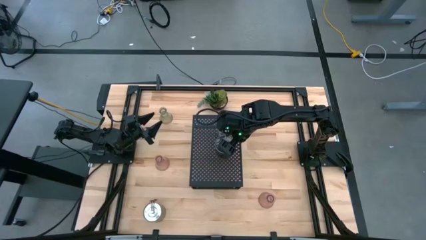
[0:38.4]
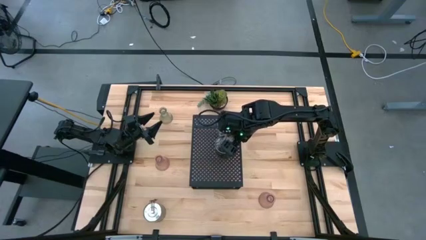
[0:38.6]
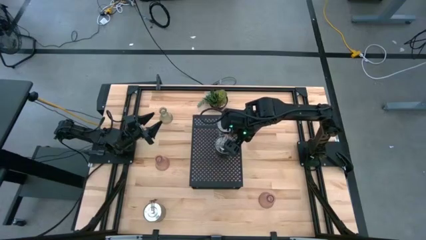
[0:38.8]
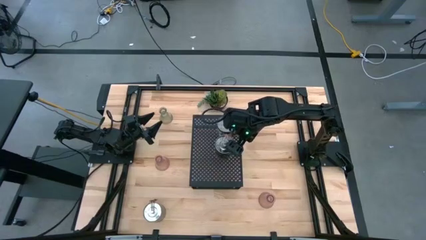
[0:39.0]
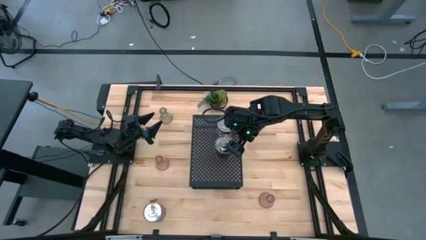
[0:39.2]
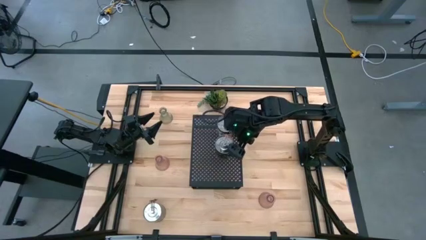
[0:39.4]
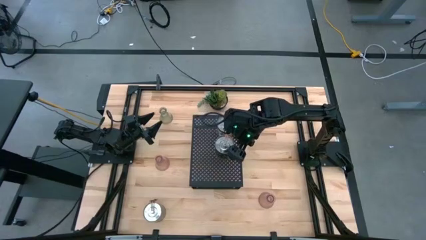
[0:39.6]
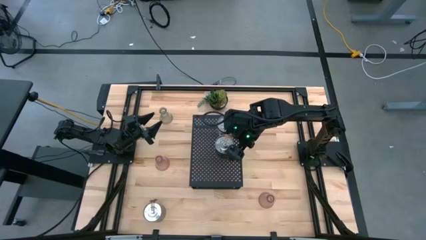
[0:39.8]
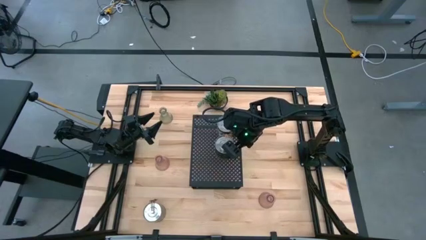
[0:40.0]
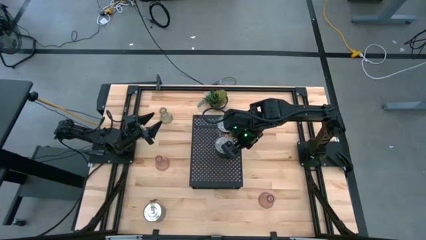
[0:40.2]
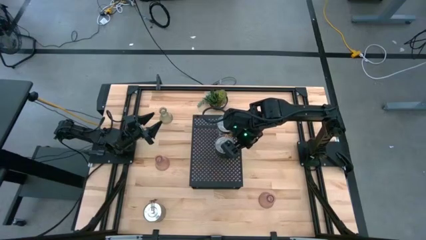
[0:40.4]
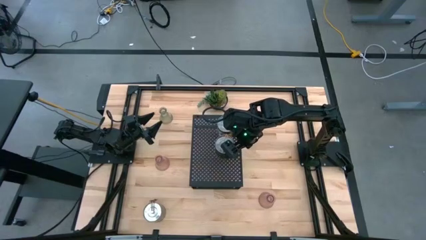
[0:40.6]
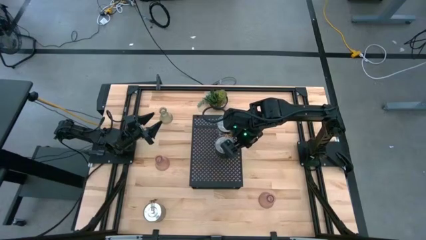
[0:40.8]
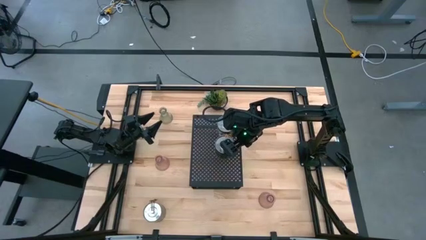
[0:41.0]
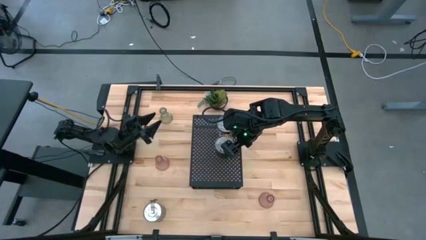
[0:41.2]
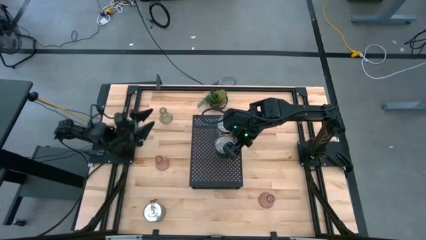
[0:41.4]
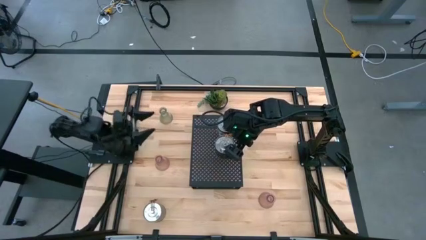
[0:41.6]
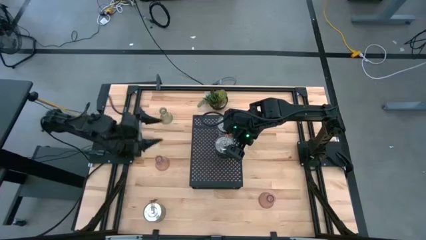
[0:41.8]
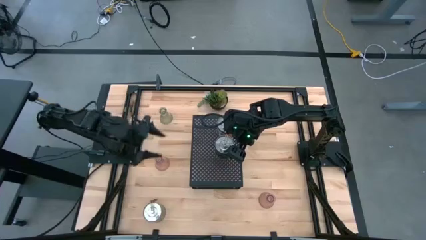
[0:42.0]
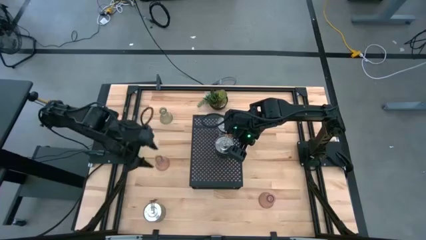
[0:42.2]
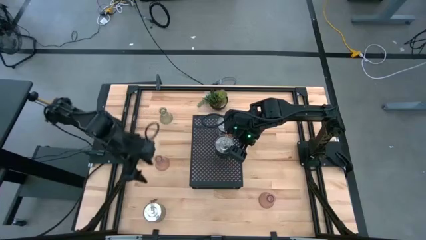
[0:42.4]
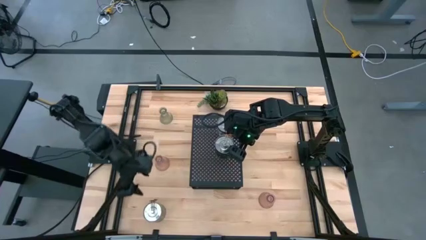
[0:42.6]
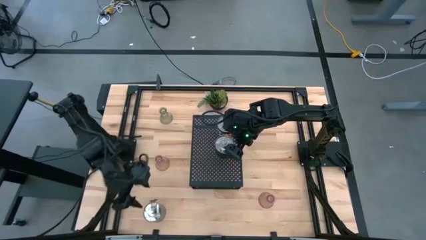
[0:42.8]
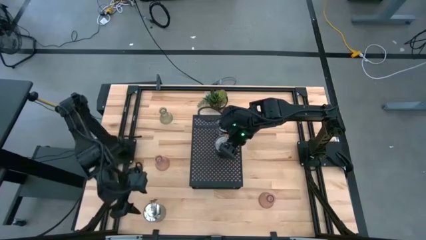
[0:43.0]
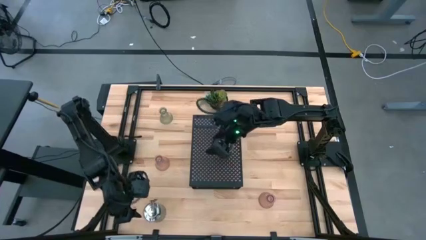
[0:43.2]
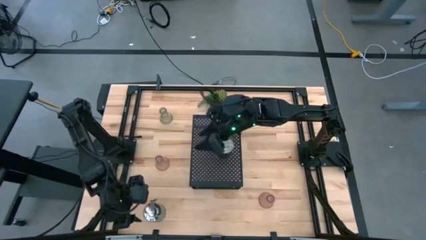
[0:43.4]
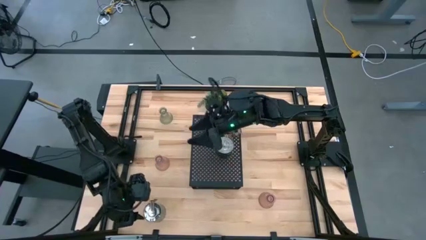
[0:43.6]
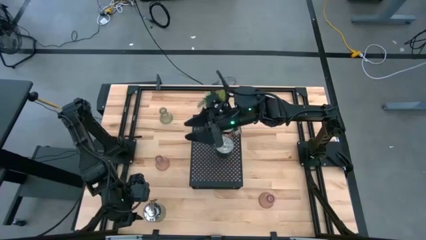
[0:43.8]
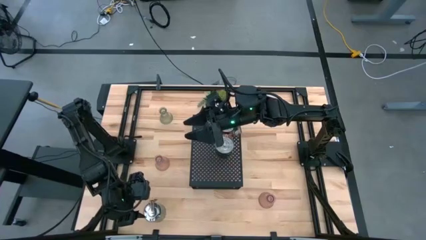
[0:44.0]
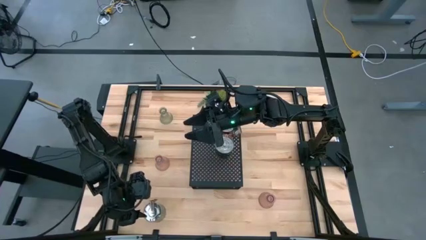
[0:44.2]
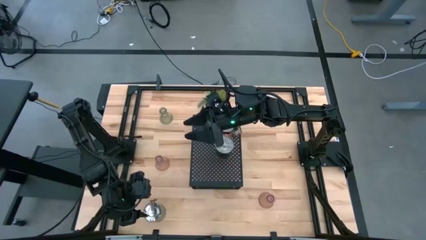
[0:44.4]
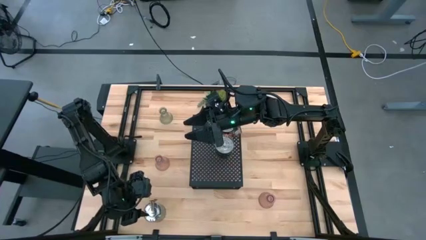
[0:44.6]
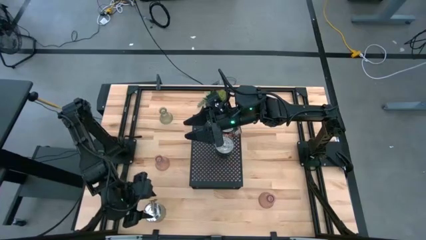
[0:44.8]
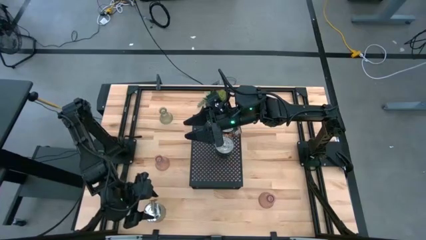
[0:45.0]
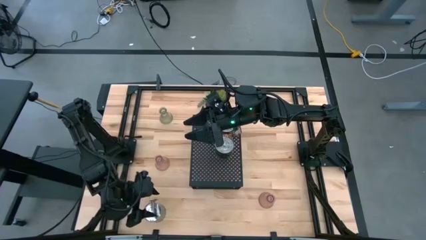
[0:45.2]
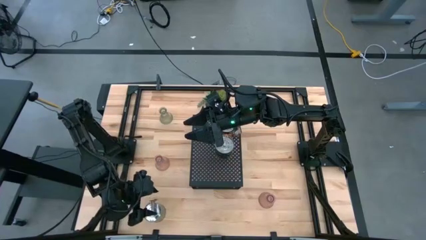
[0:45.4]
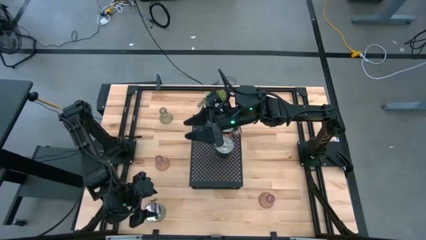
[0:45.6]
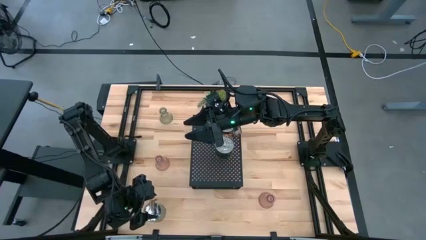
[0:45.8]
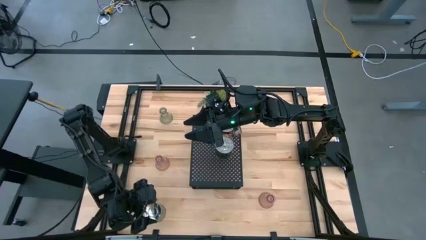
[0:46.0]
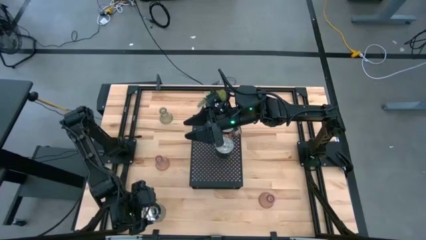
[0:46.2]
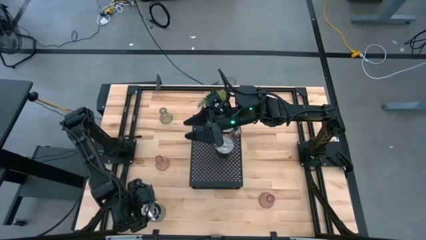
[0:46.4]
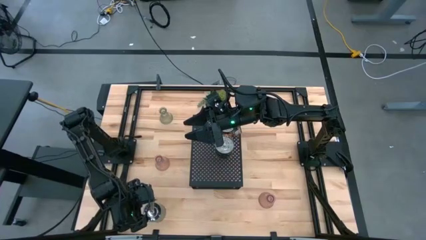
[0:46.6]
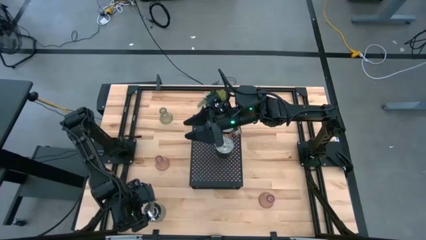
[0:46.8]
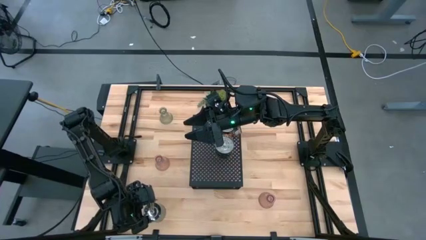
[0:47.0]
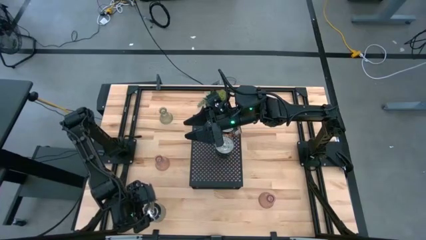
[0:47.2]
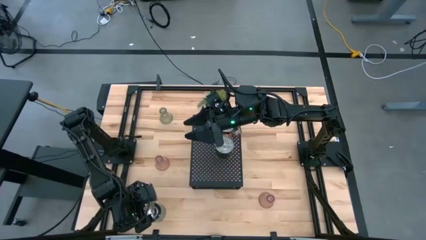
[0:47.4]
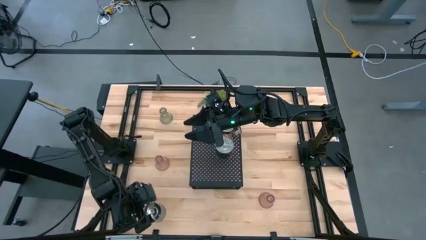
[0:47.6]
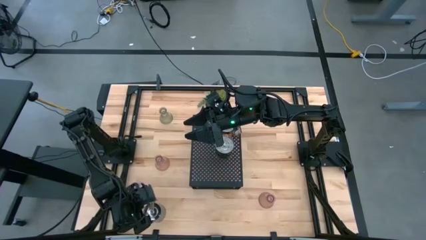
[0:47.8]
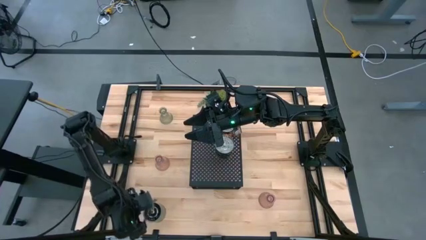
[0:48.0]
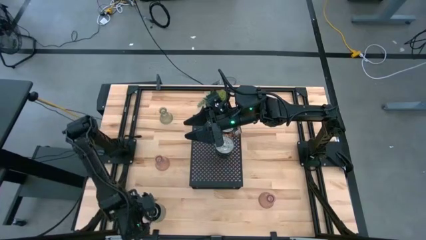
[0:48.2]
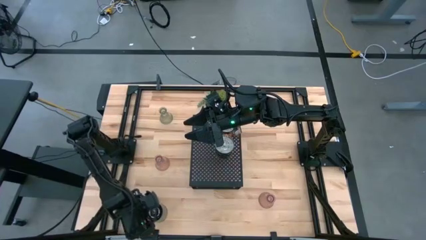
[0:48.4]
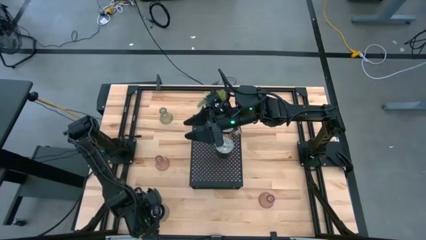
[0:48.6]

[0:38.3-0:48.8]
Task: Pick & Place candle stick holders
Put the scented candle can on the shelf aligned with the other scented candle cans

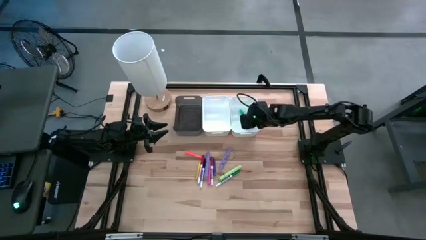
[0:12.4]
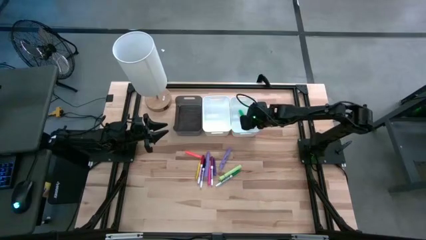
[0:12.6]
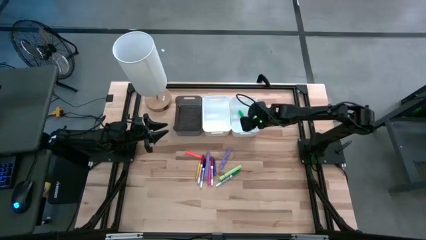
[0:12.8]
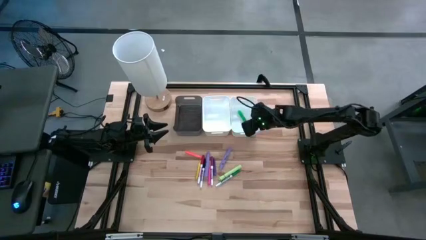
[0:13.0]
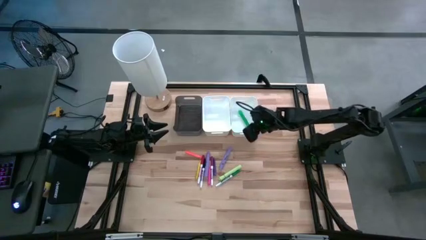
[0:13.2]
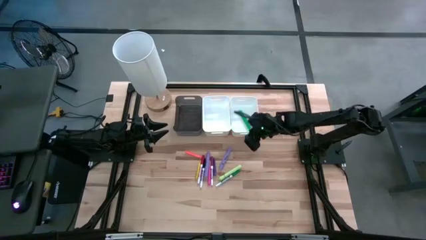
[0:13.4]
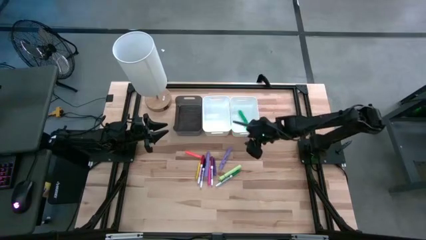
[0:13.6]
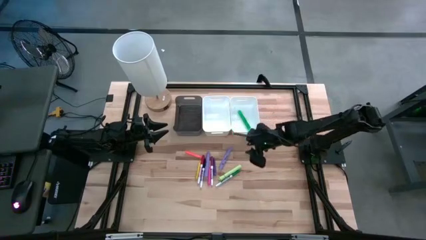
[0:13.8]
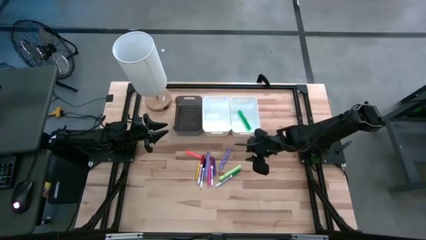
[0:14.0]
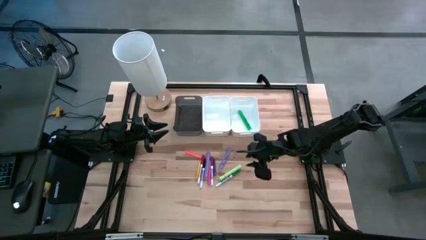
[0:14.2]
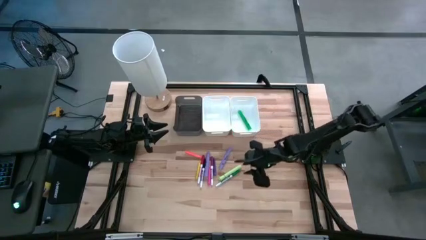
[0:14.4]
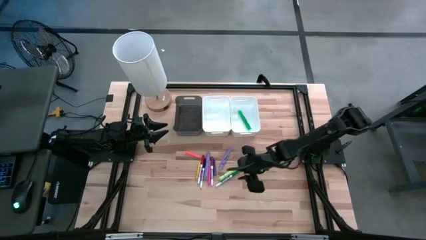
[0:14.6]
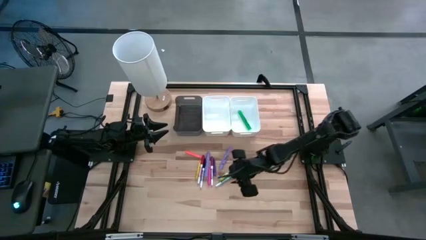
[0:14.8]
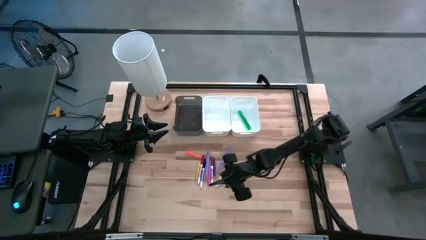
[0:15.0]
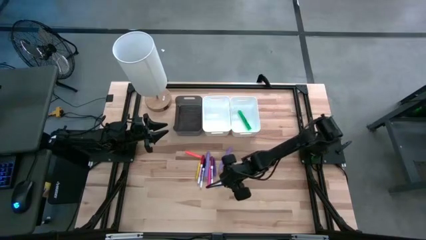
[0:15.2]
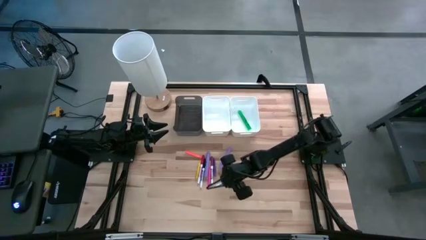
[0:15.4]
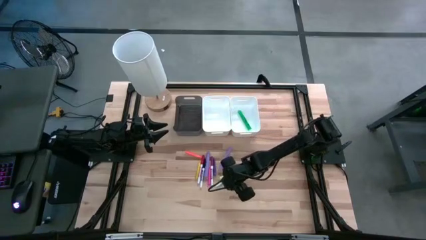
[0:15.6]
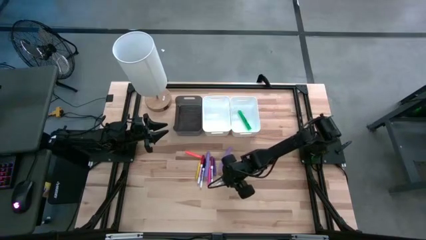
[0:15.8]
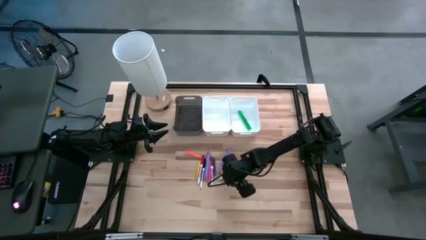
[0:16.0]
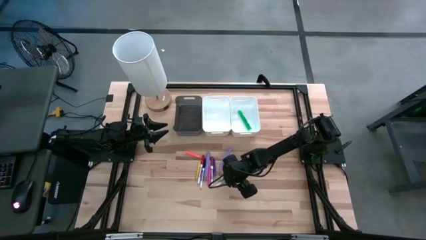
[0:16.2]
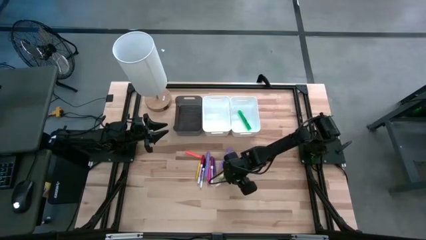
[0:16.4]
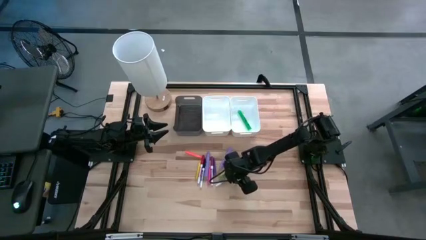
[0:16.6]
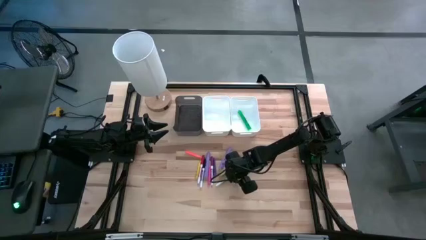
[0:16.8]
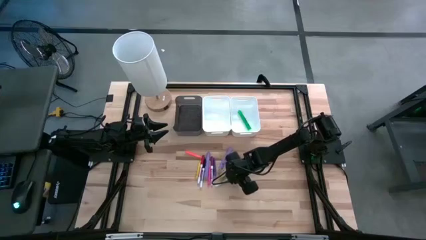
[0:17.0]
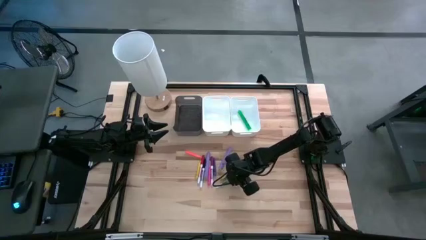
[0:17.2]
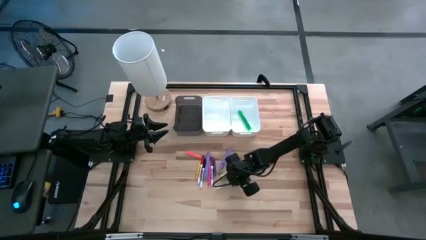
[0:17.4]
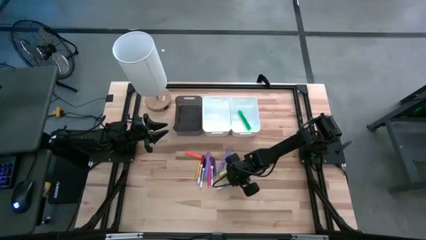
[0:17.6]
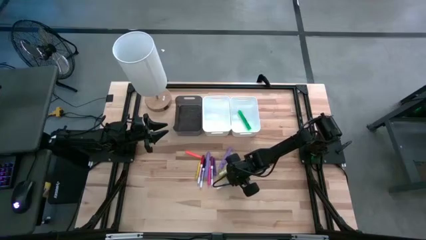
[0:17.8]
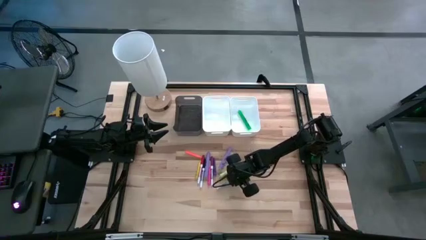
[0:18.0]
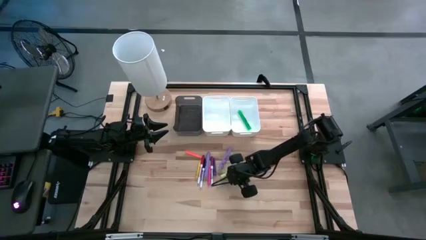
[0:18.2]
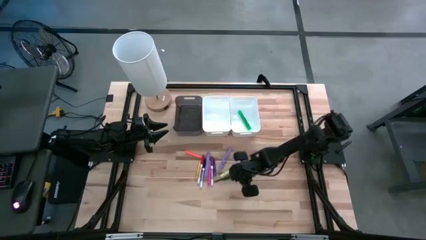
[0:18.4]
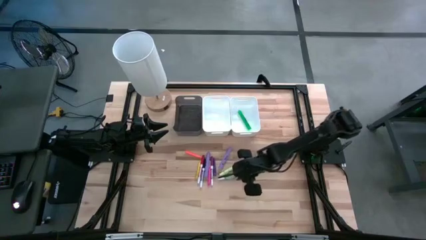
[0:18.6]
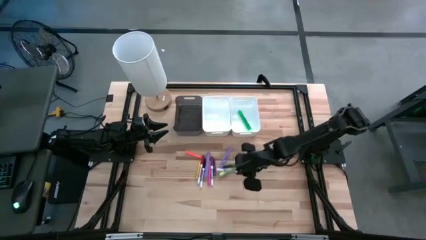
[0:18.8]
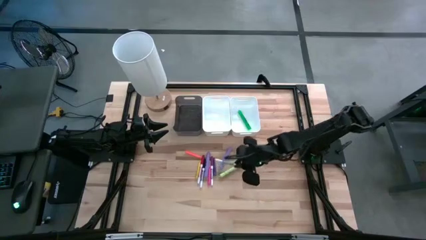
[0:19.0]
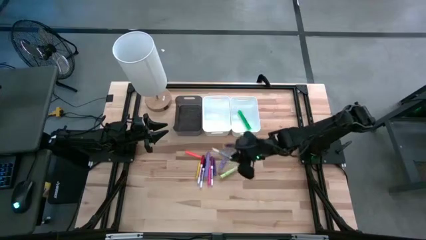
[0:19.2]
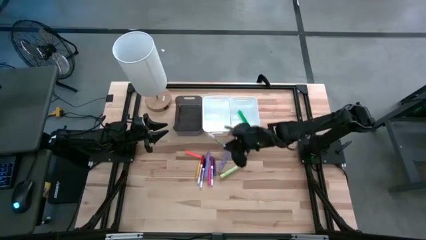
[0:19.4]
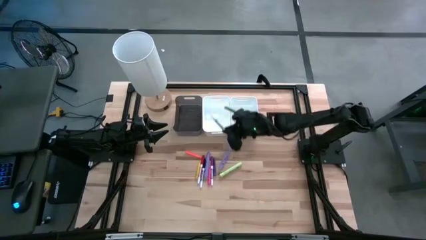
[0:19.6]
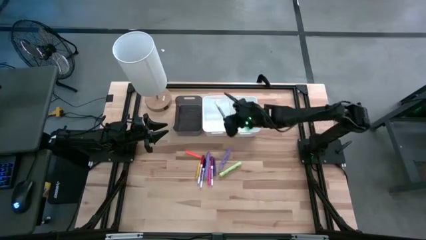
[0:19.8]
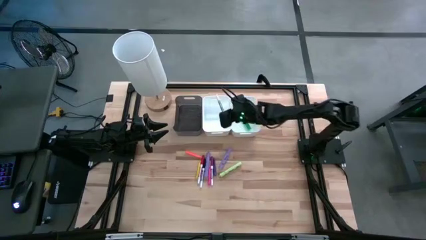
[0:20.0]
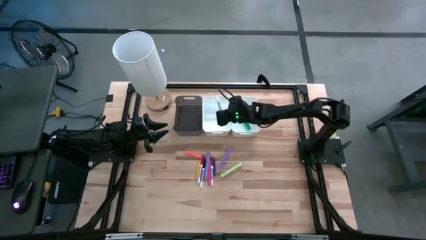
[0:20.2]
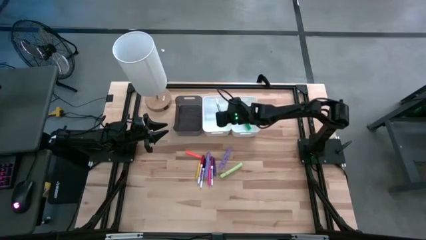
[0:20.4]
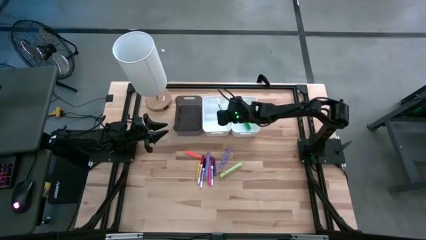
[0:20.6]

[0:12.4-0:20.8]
Task: Pick & Place Markers
Put the green marker pen into the left white bin
